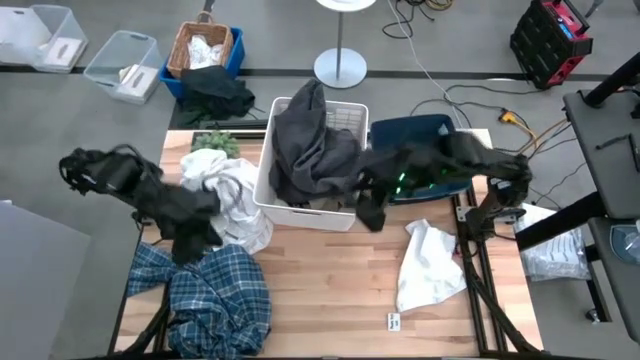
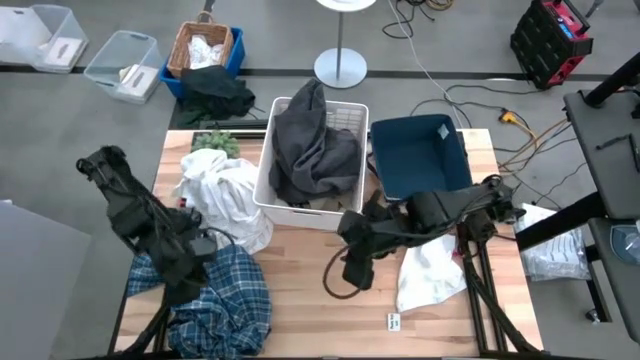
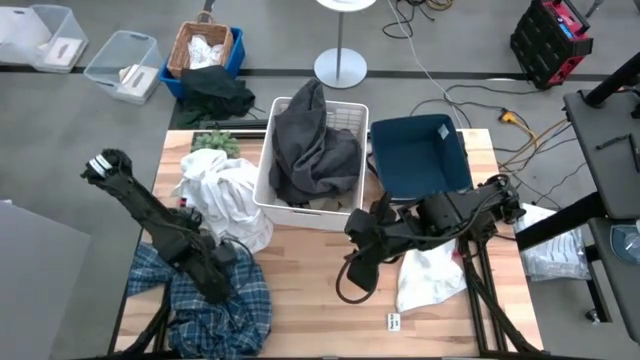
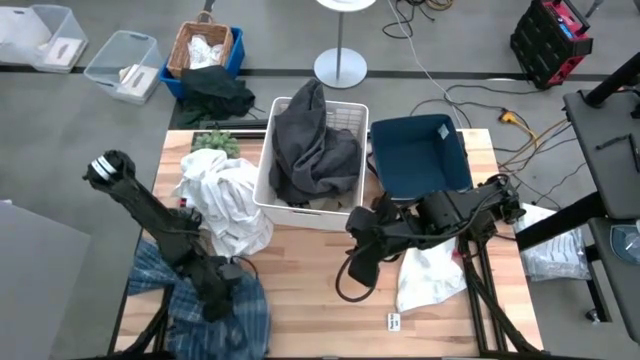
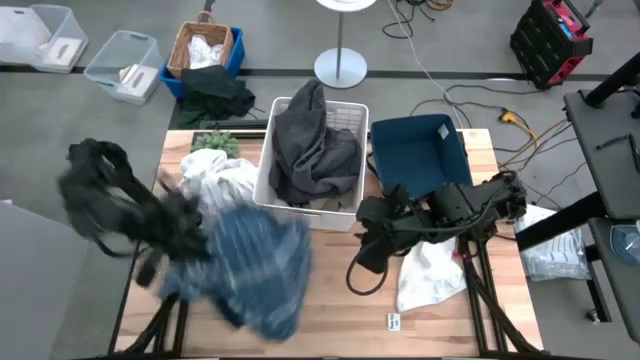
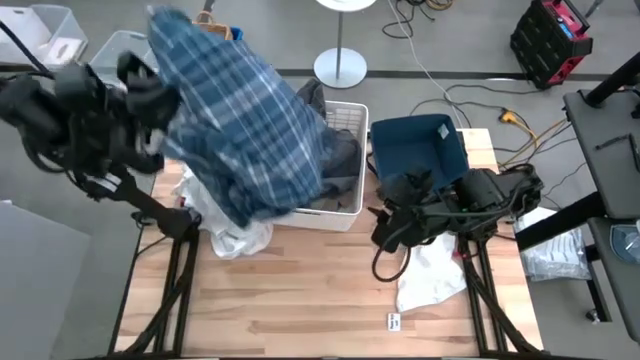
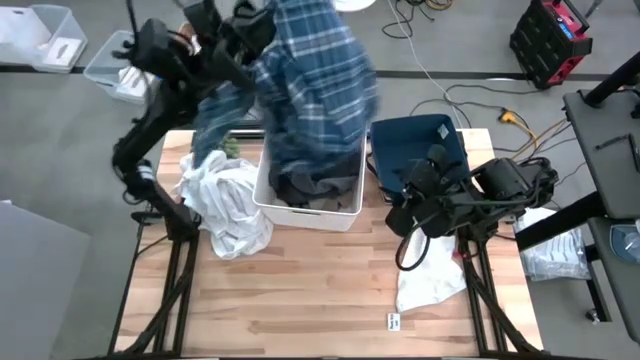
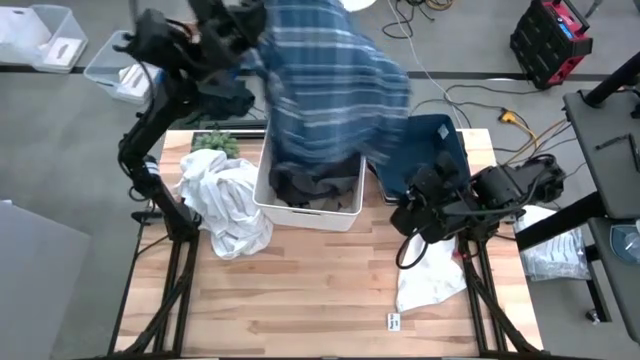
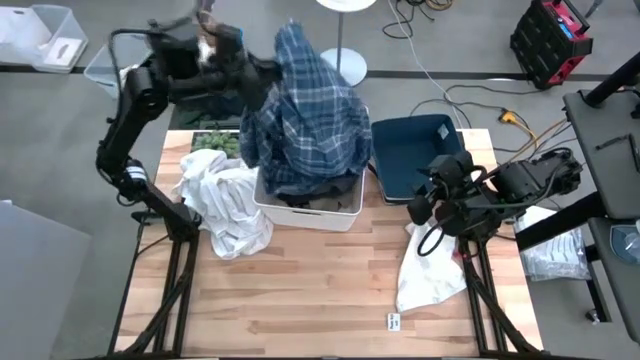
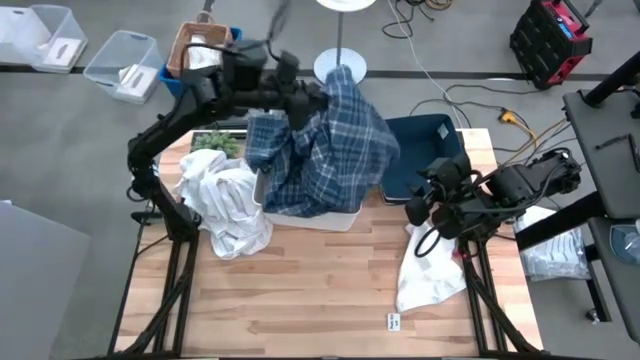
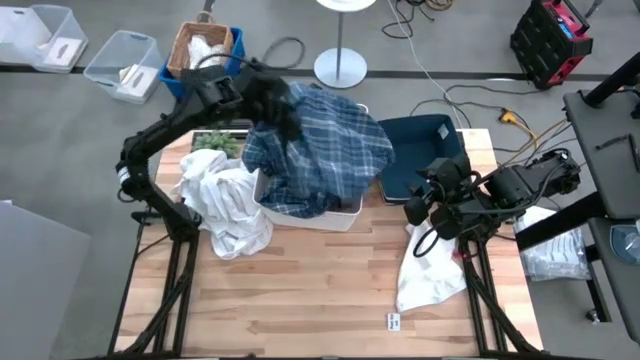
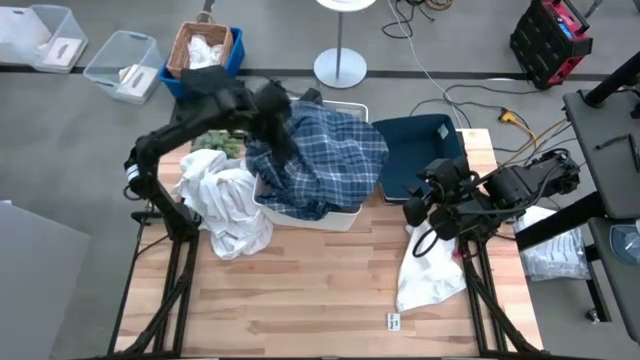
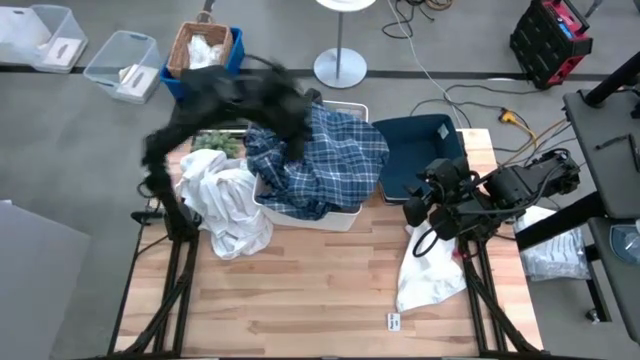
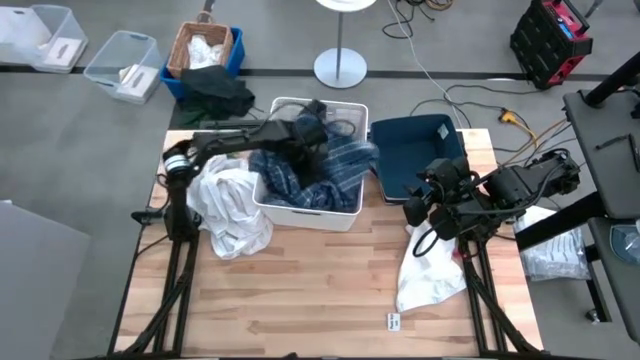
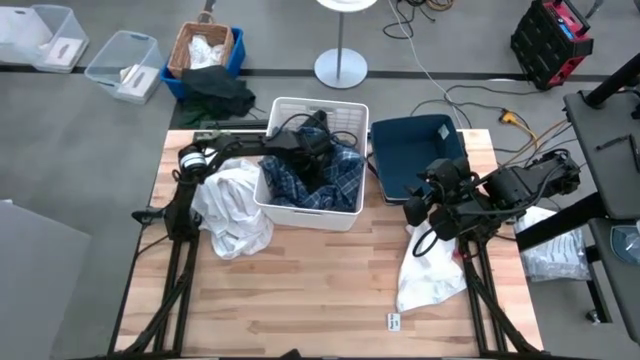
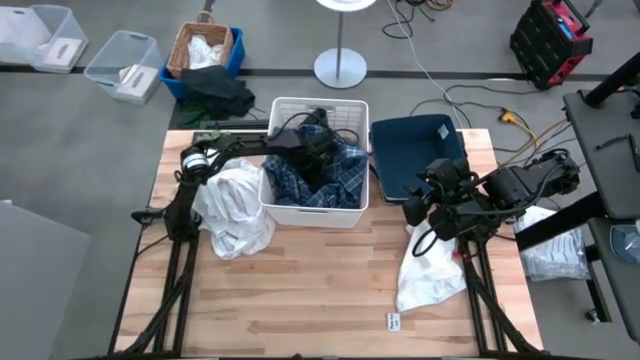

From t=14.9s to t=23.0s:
Task: Sort clothes
Put the blue plaid cloth into the white bin

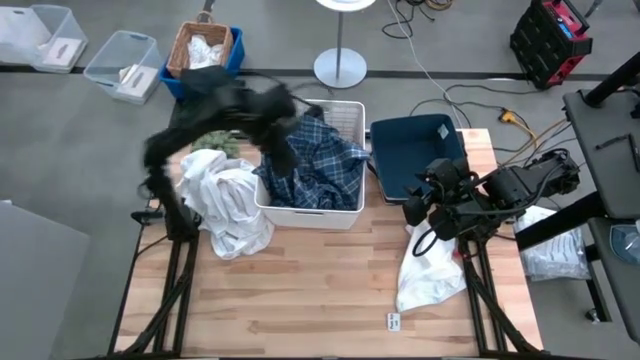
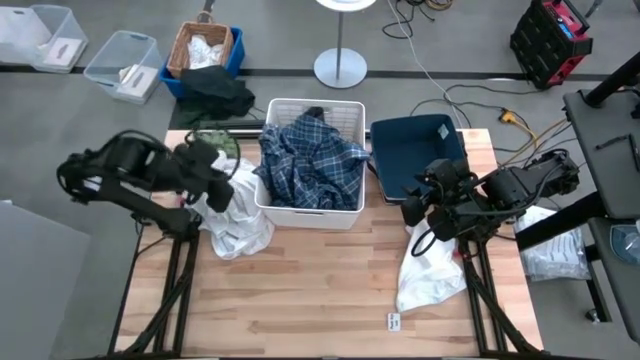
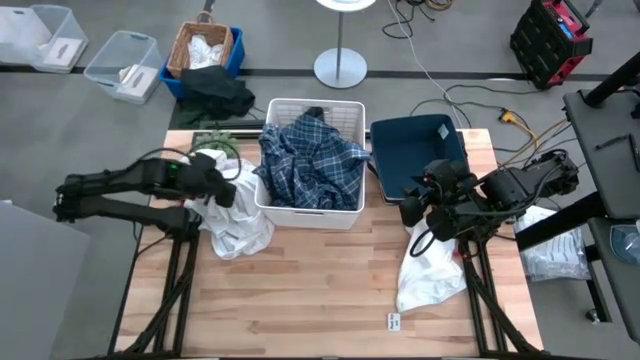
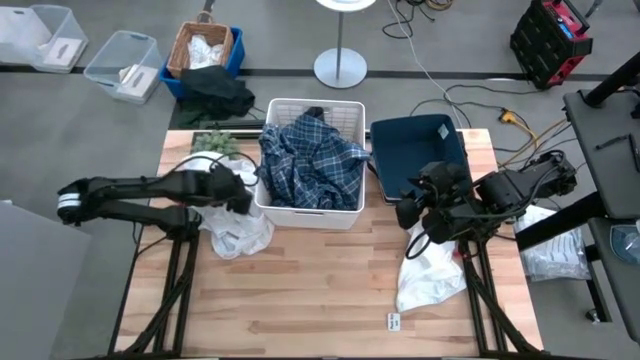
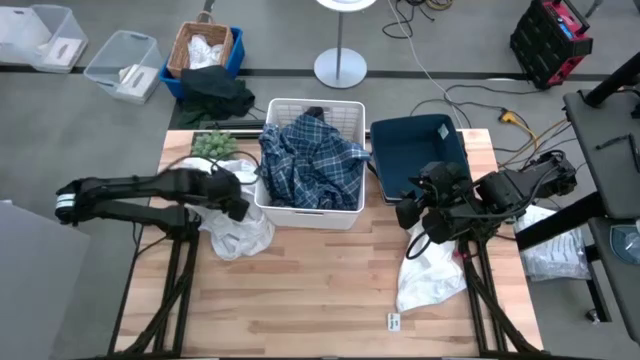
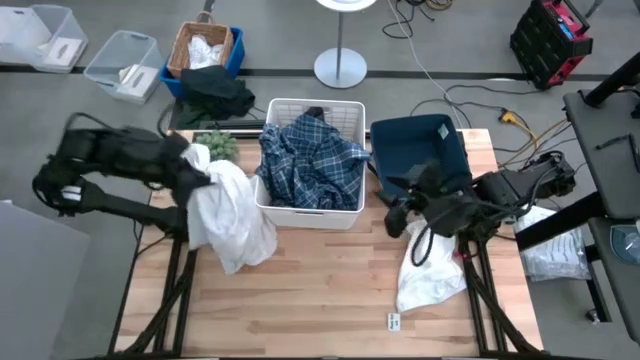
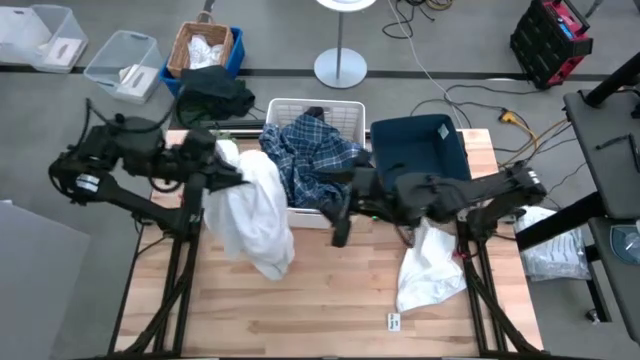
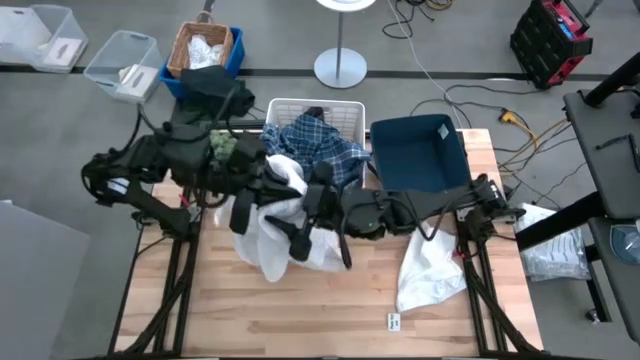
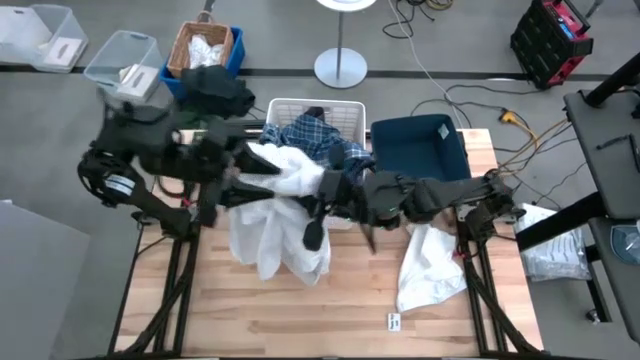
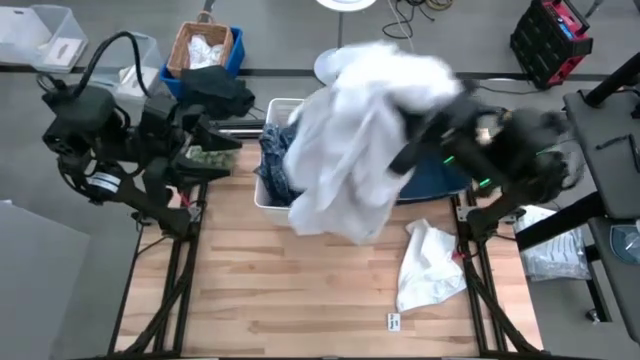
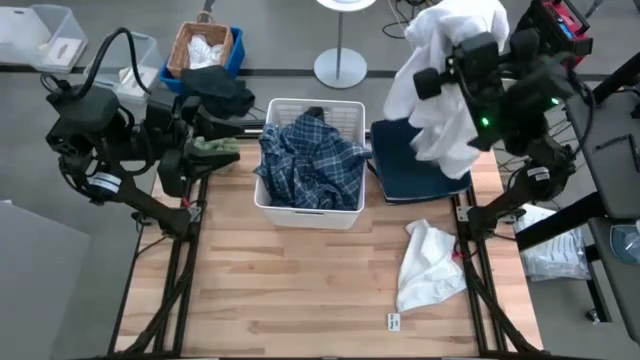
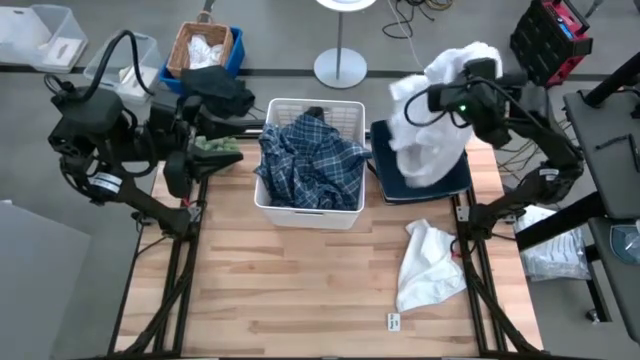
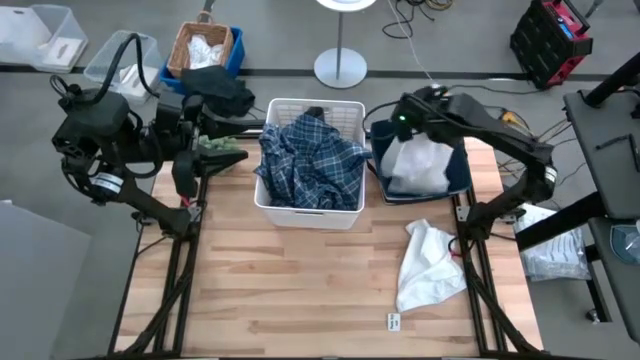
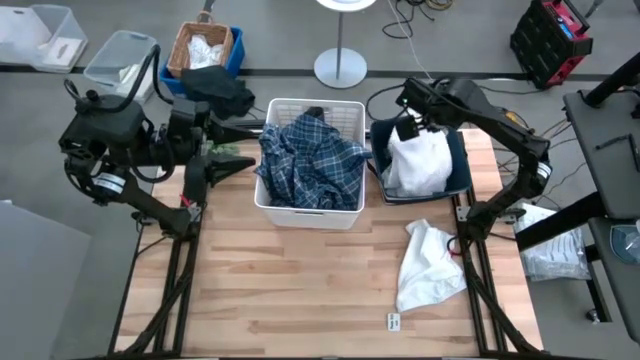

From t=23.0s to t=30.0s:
Put the left white shirt into the blue bin

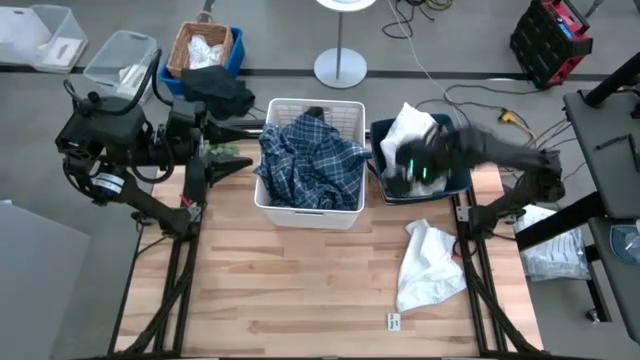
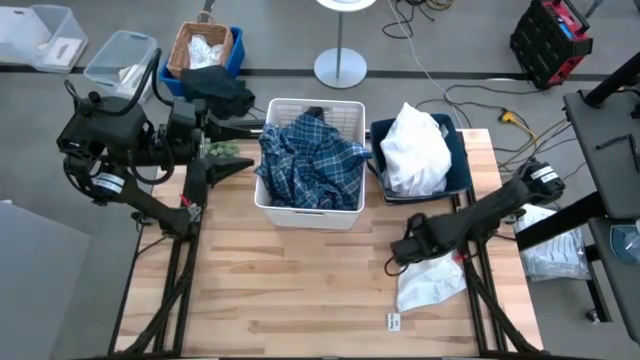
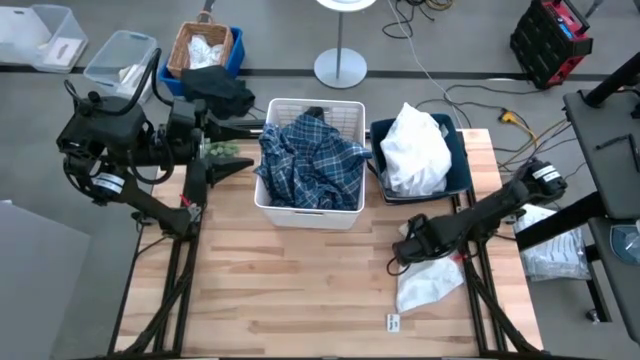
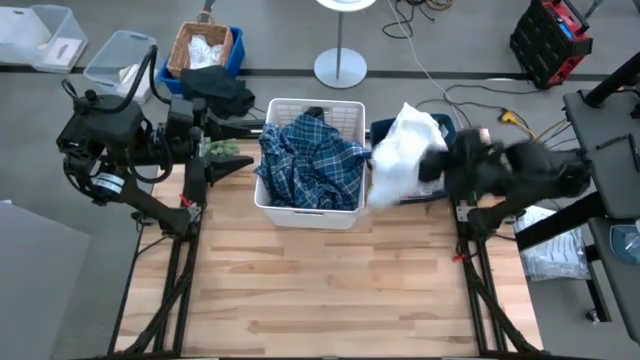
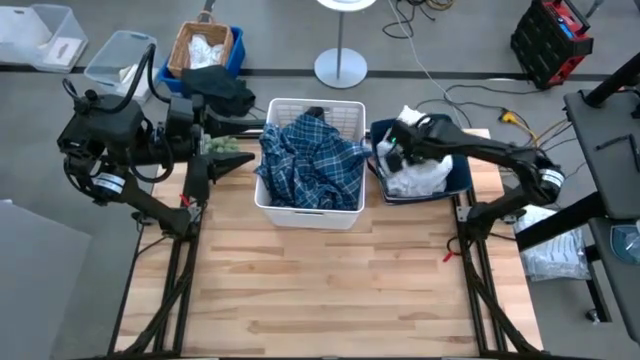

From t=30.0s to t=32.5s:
Put the white shirt into the blue bin

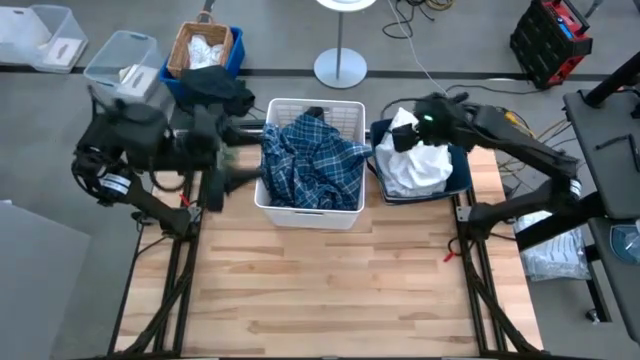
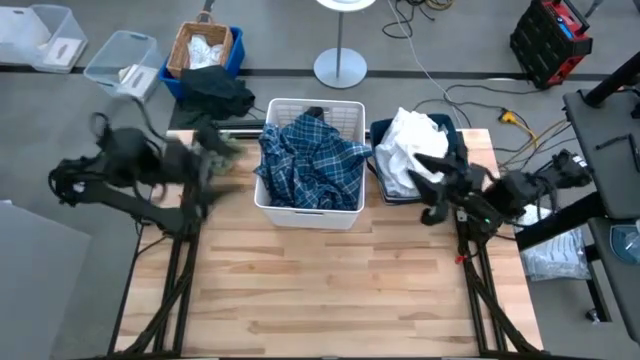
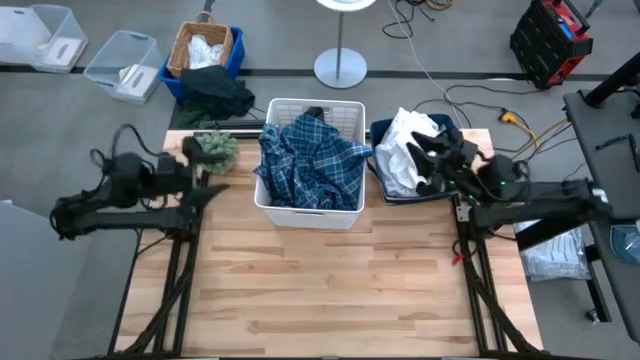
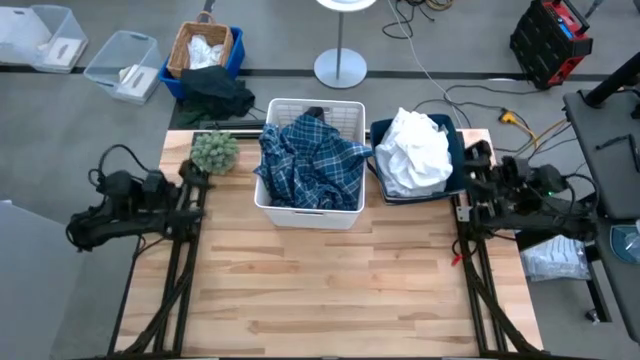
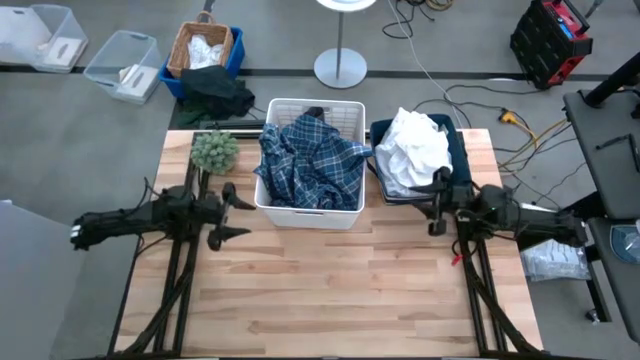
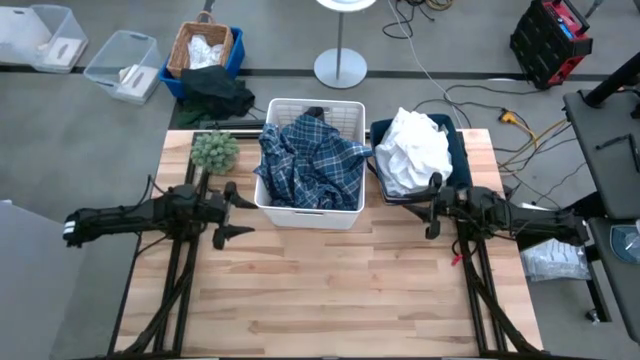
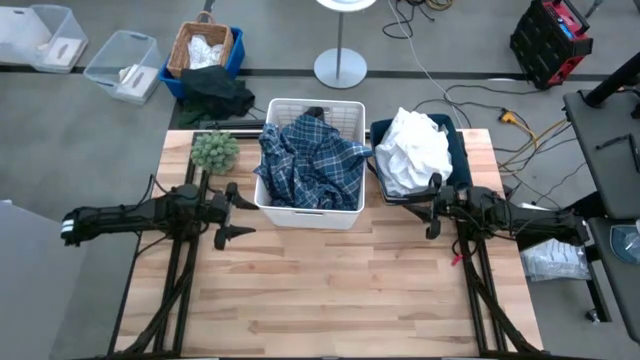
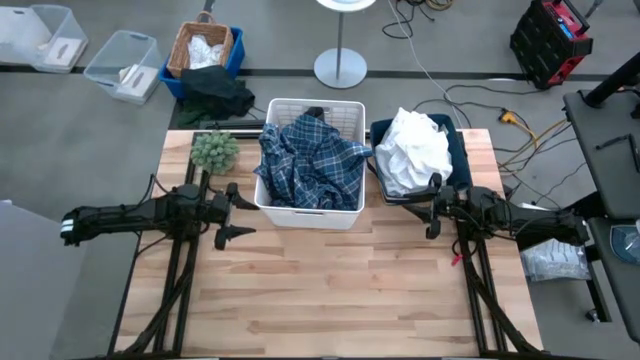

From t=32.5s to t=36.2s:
Return to Home Position
